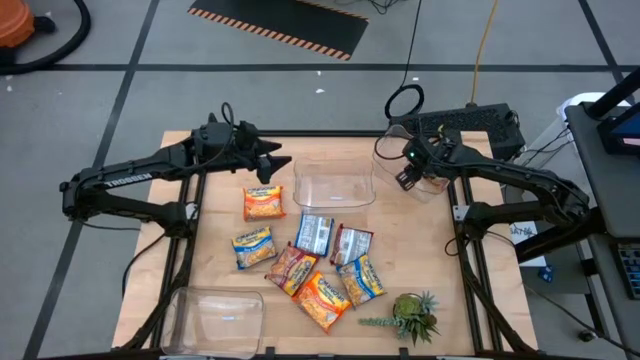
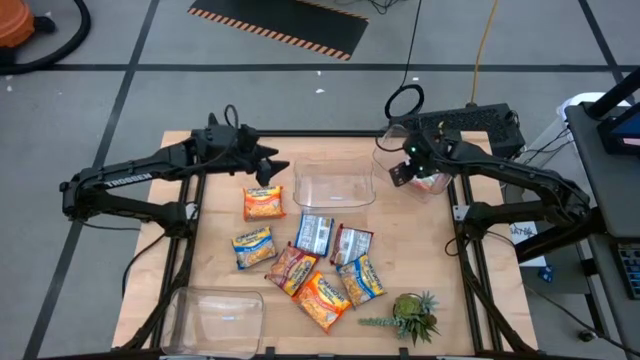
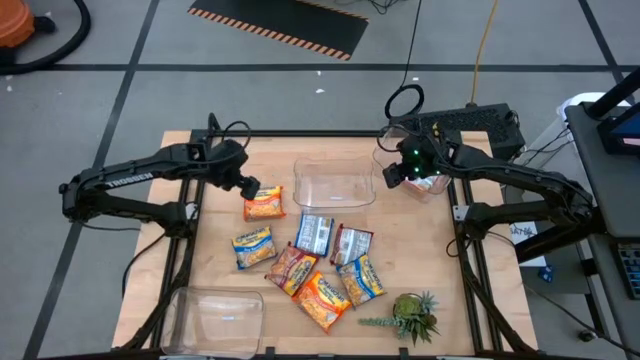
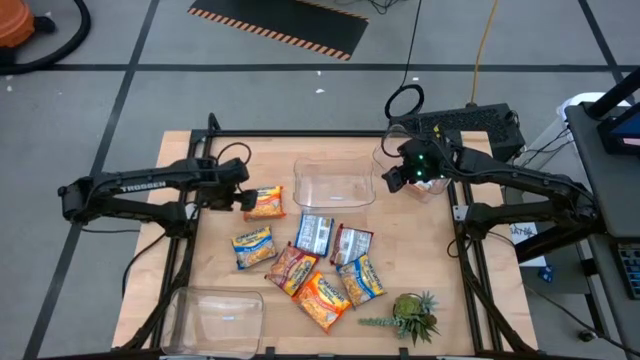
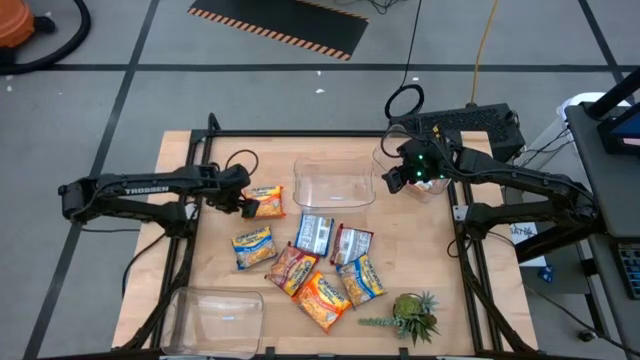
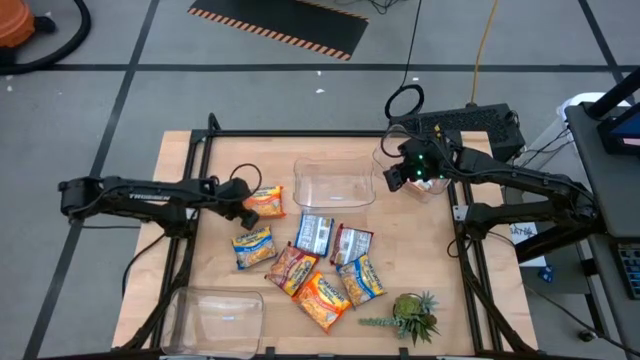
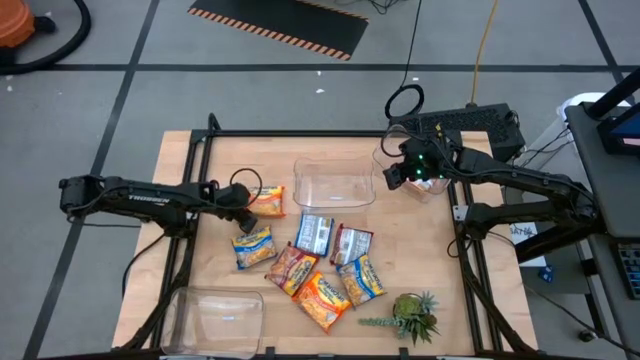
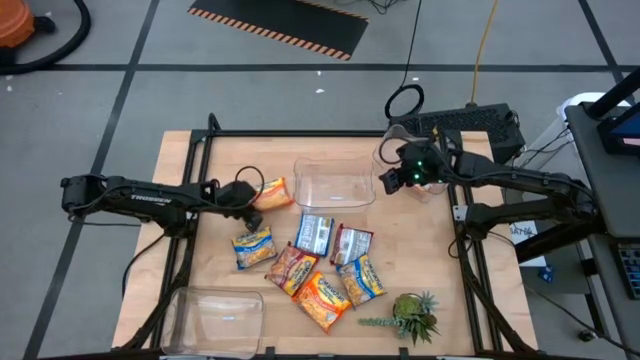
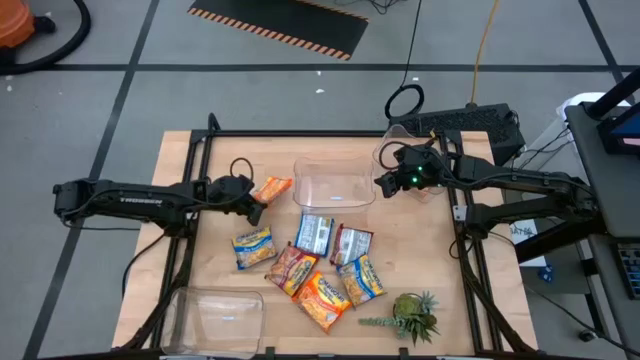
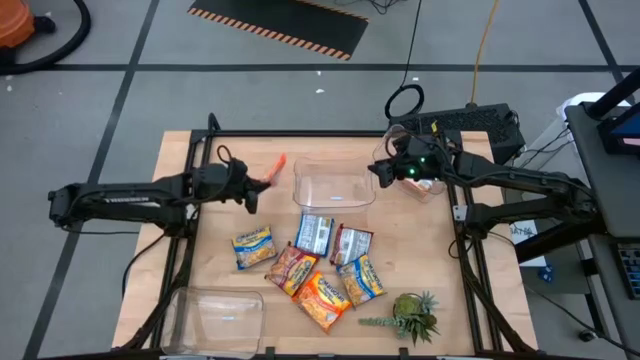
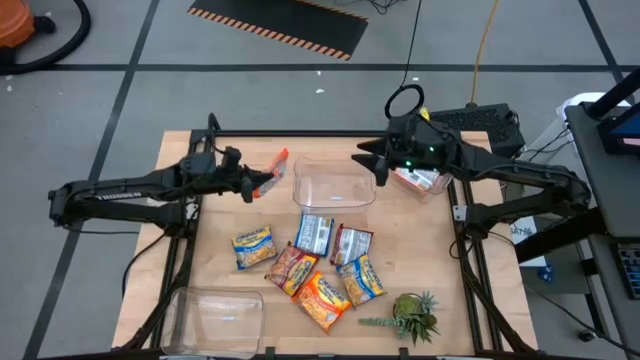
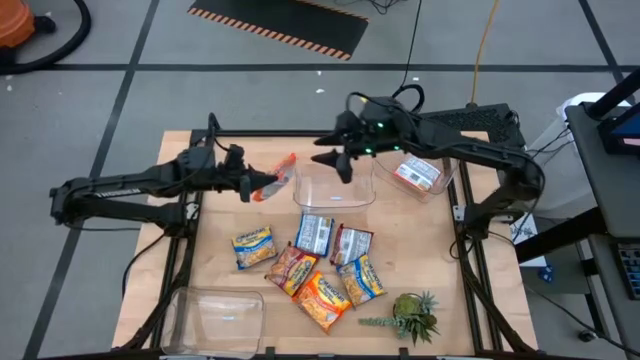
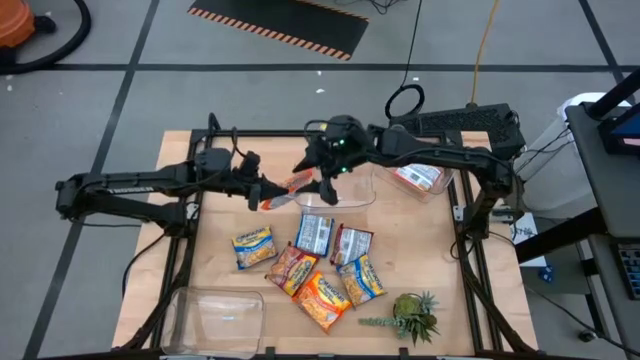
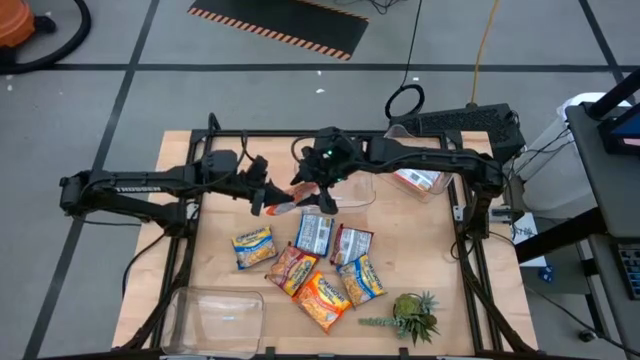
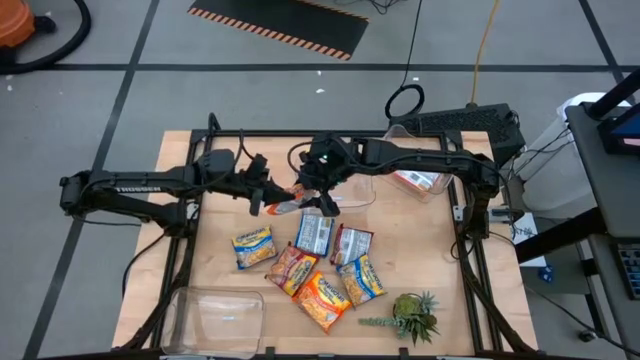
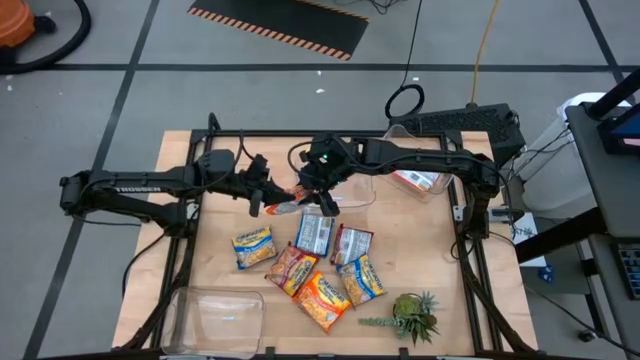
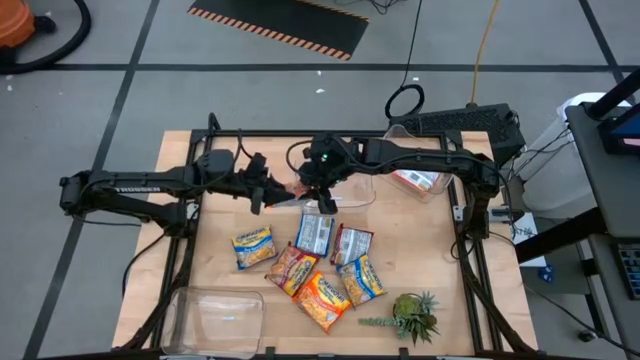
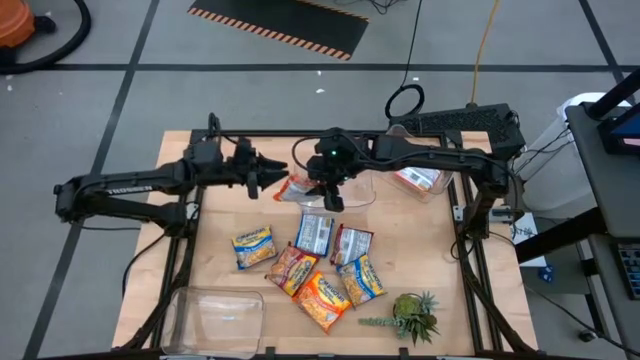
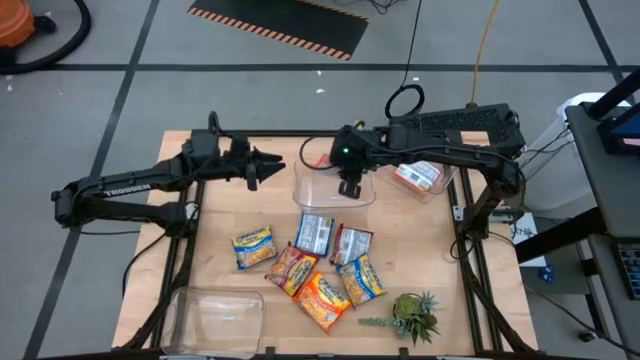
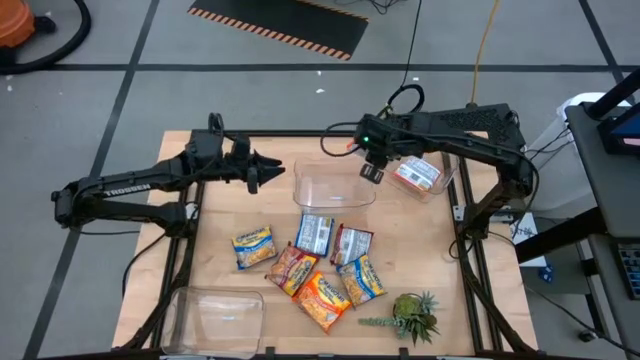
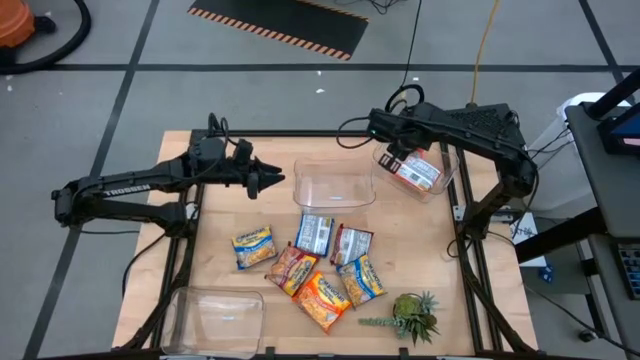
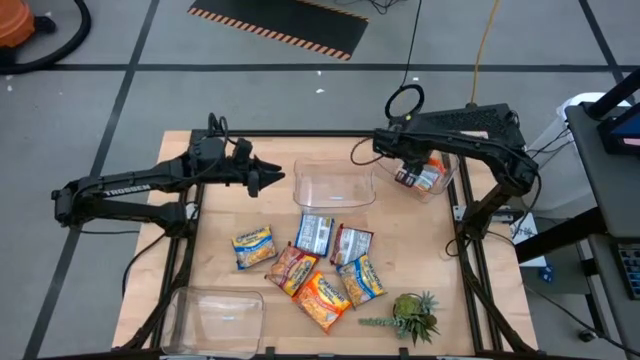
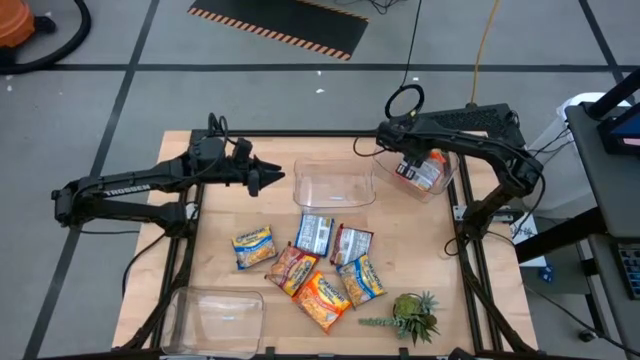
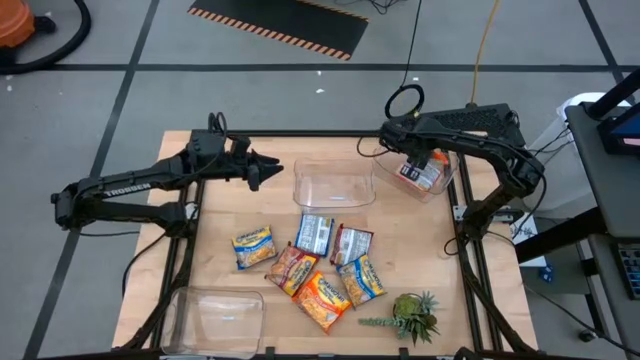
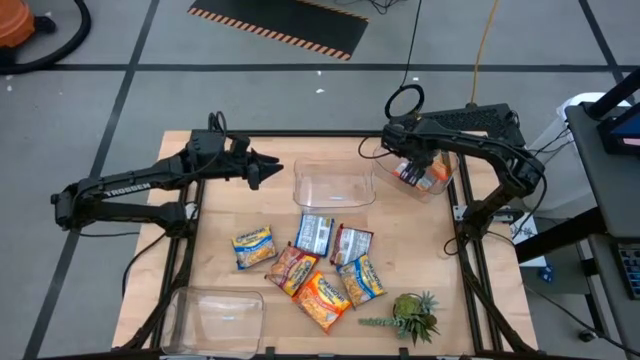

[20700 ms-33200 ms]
Task: Sort Maruchan noodles
Stack the top orange noodle pack on top of the other orange noodle pack into the top right transparent bin

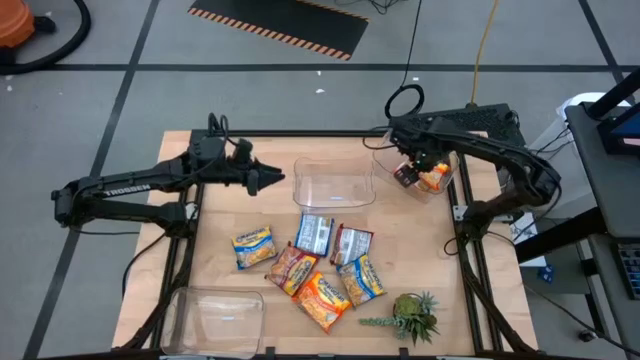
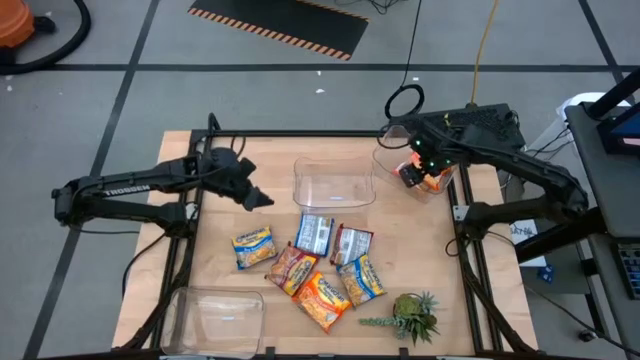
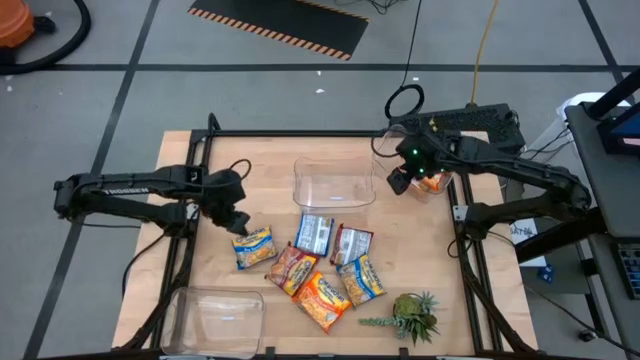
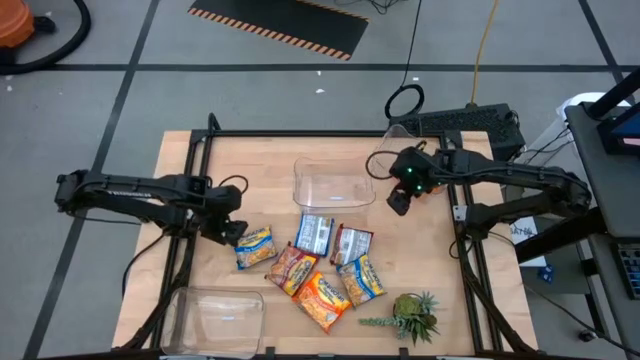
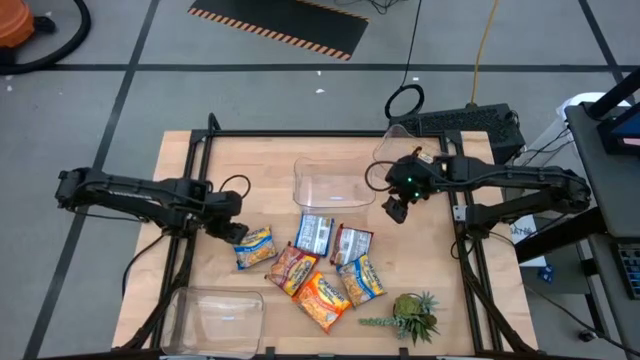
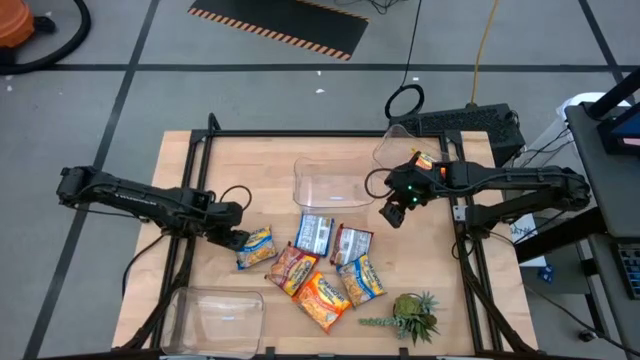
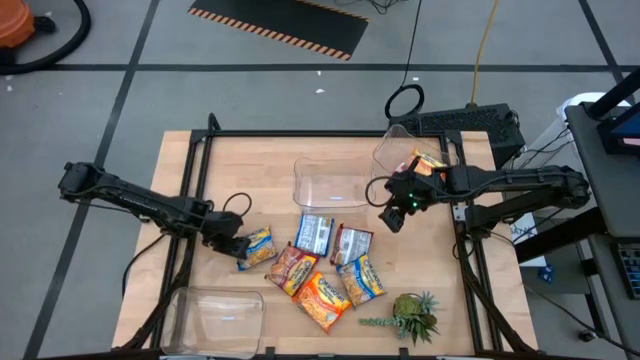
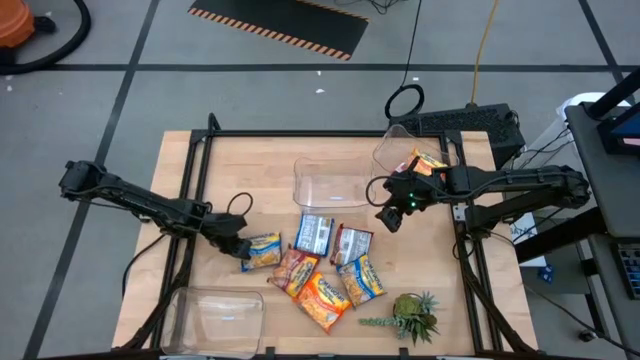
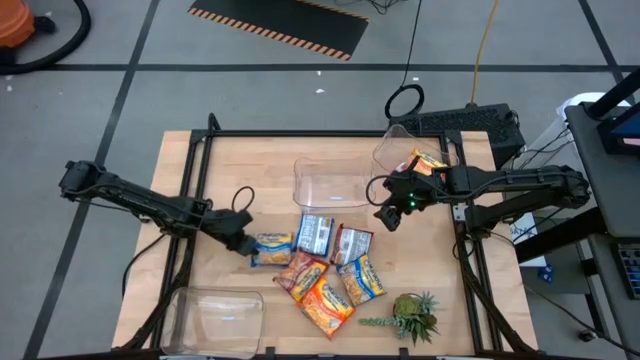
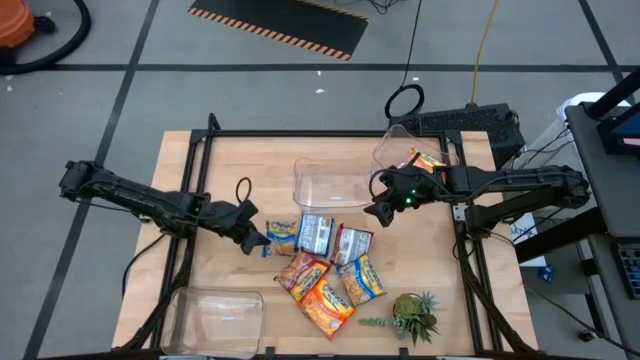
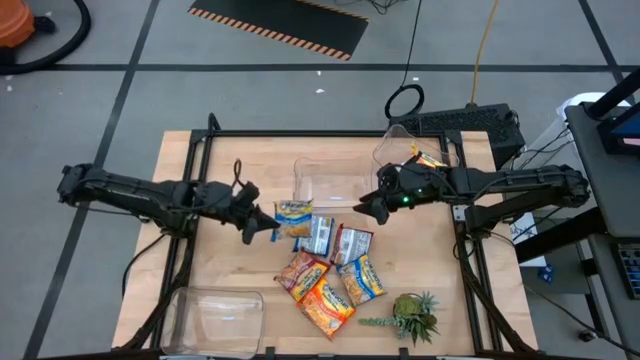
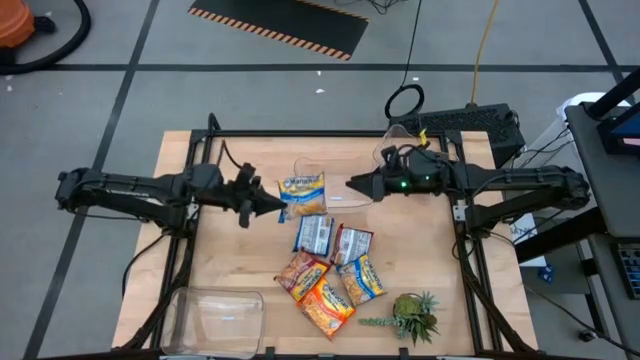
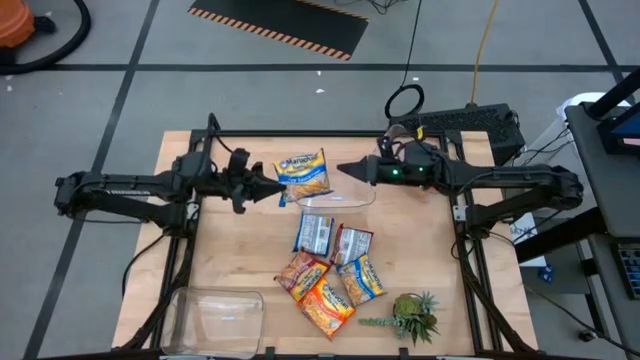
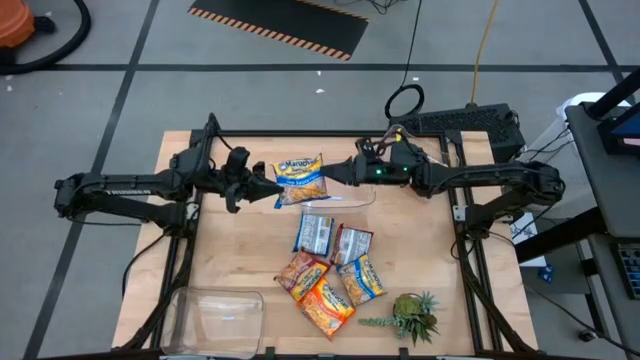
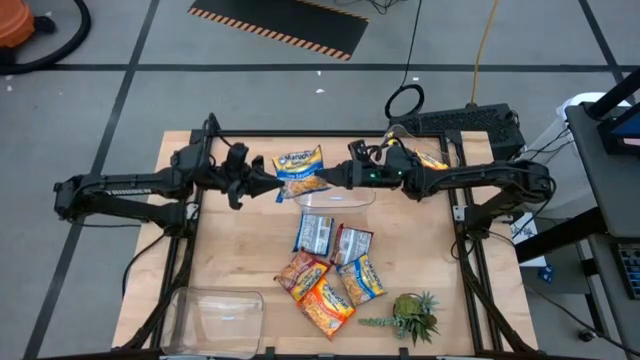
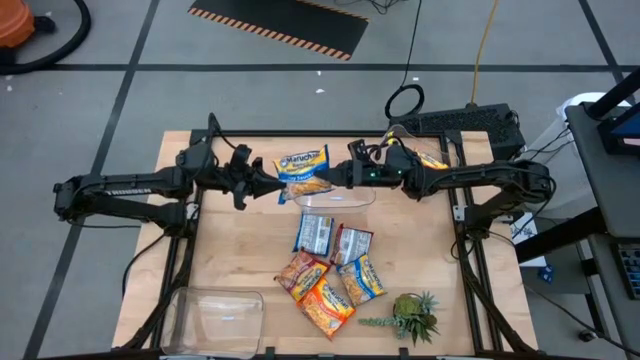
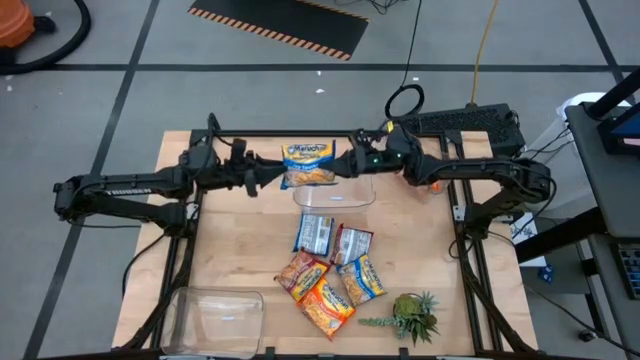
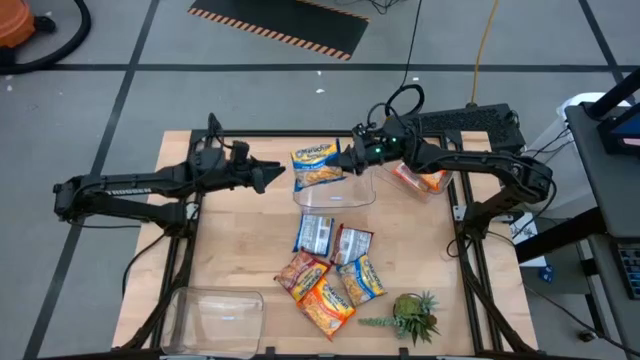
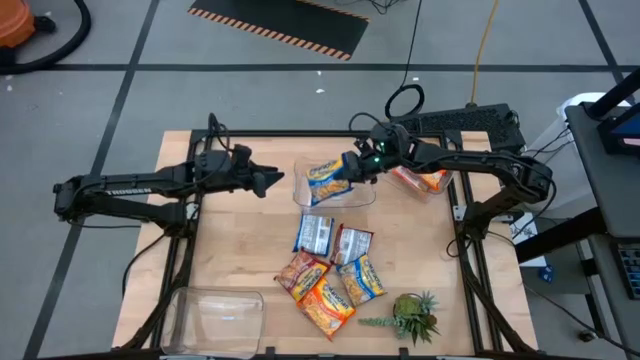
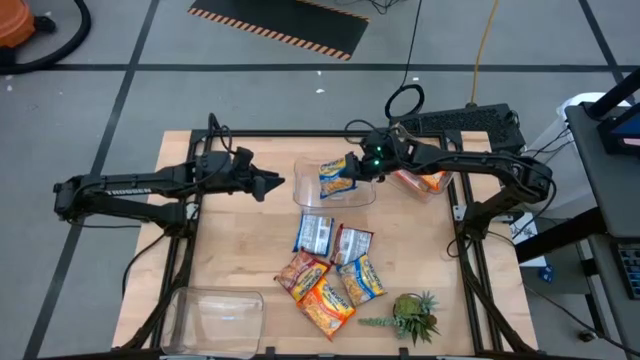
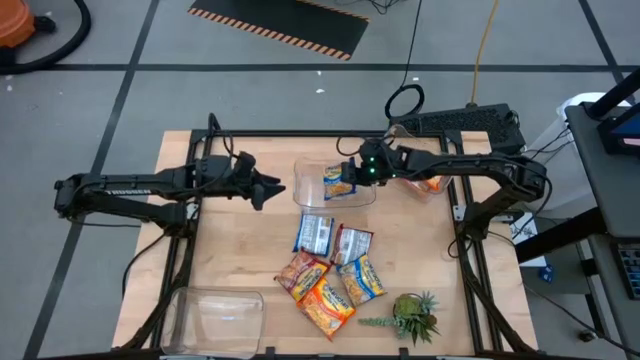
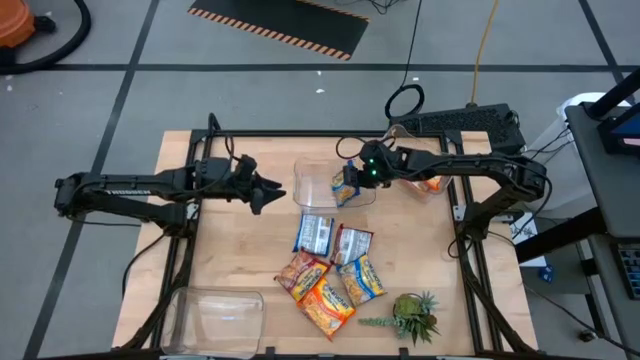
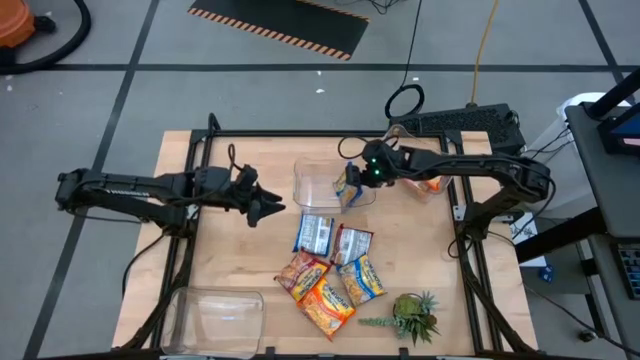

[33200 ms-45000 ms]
Put the top left blue noodle pack into the top left transparent bin
